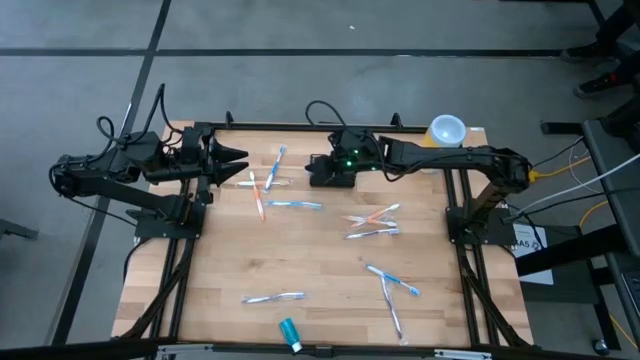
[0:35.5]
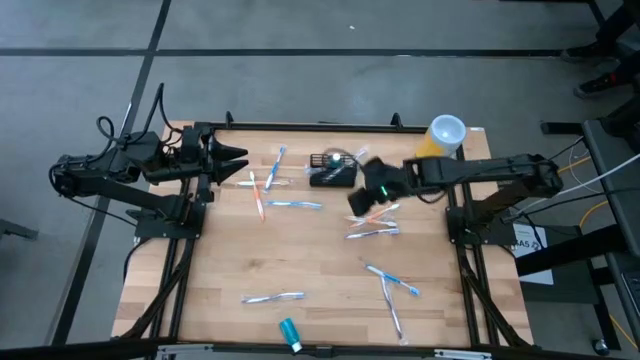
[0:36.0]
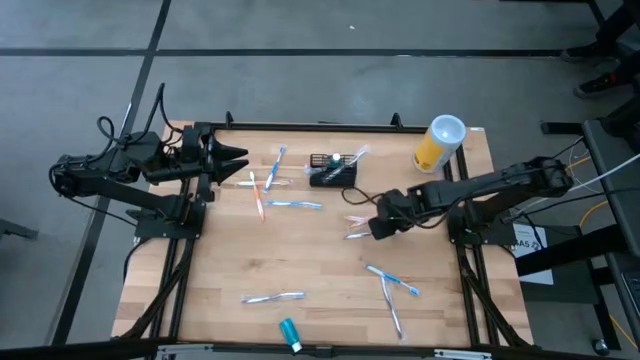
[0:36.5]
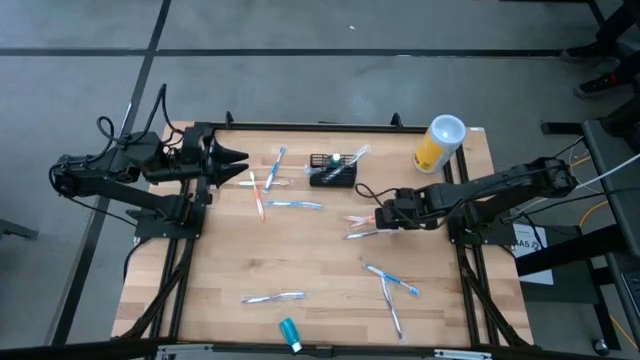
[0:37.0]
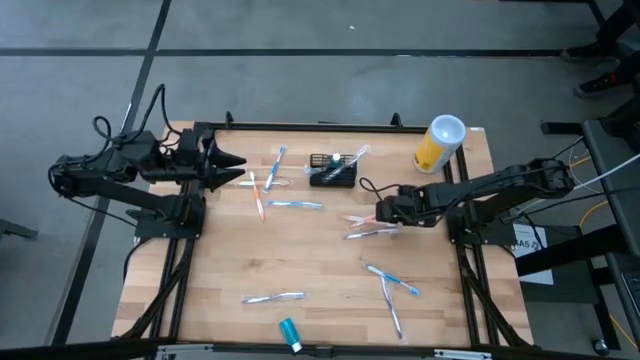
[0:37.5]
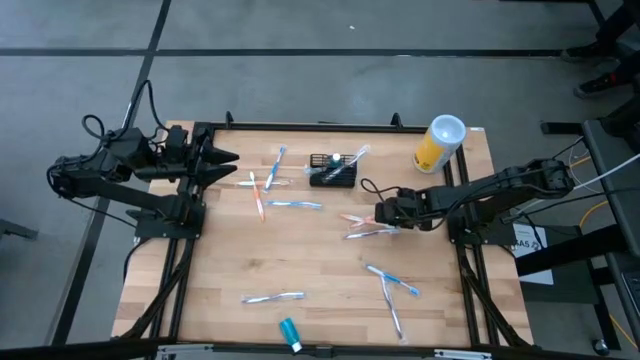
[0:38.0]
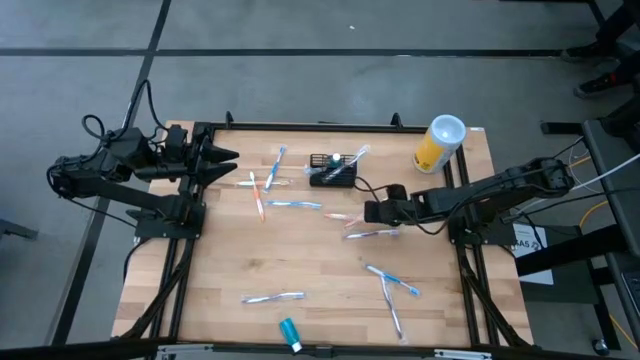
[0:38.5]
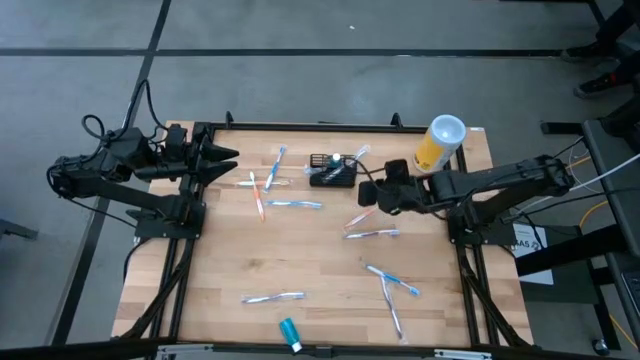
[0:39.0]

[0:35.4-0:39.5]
Task: Pick & Place toothbrushing station
Put the orange toothbrush into the black mesh organizer

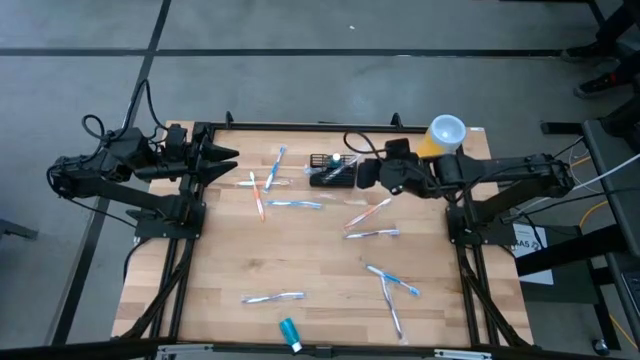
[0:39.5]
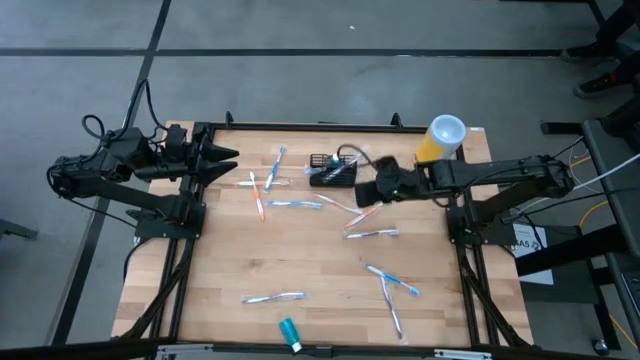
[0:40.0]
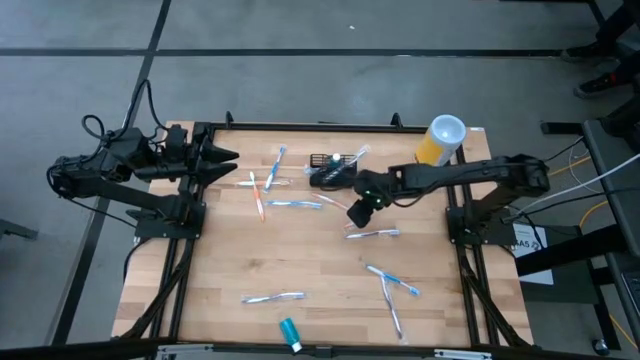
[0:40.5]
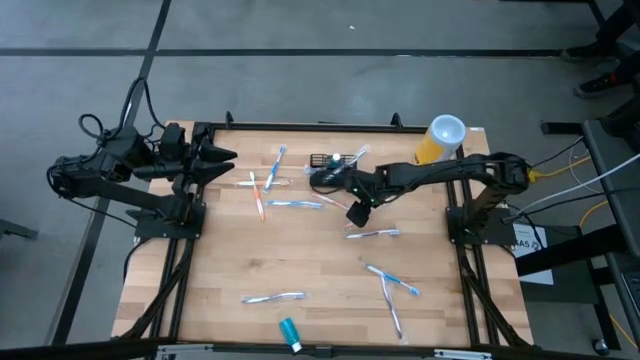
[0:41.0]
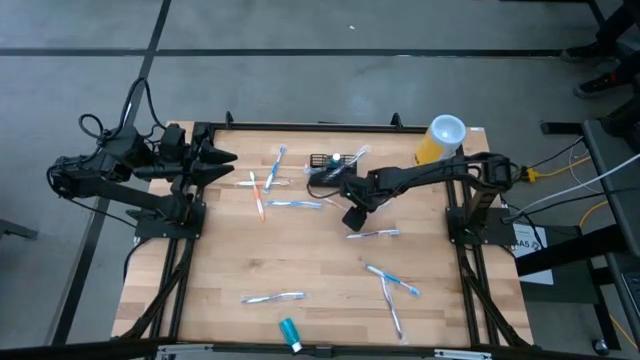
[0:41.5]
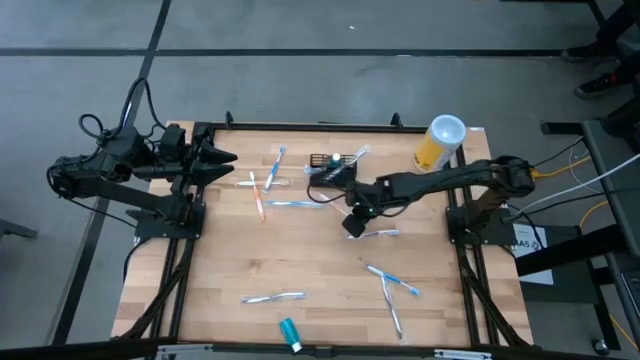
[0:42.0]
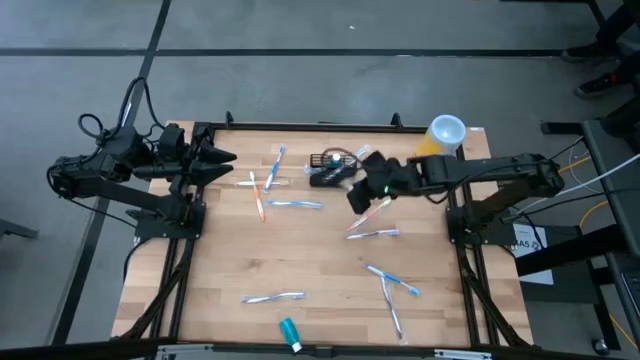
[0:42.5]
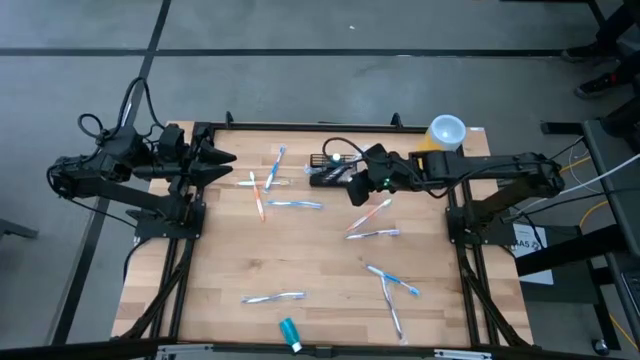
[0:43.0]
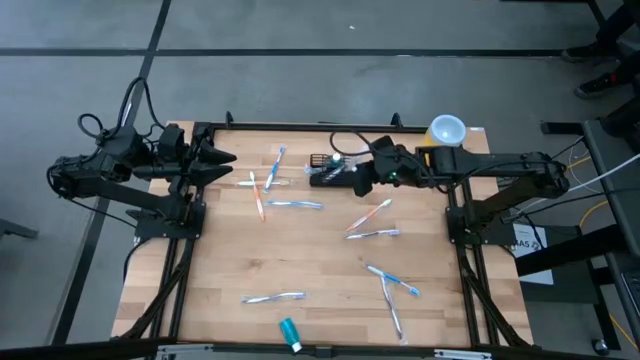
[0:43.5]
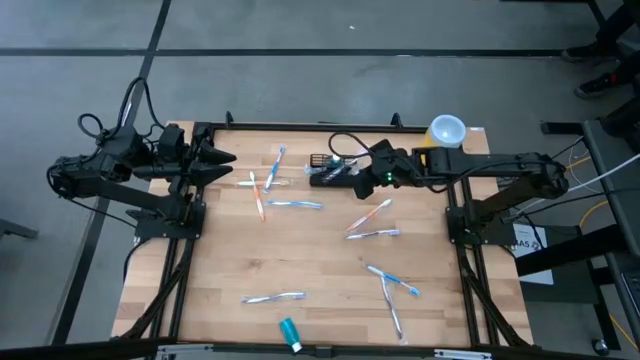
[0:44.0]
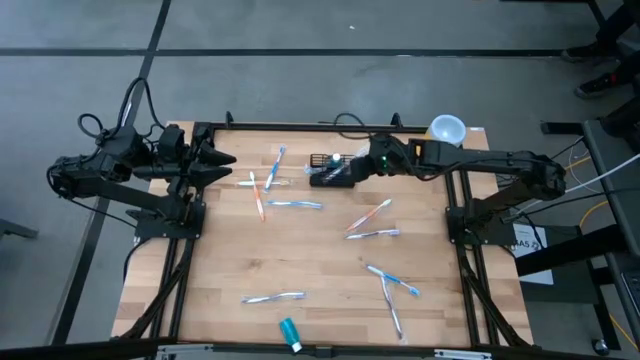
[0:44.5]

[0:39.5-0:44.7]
Put the orange toothbrush into the black mesh organizer

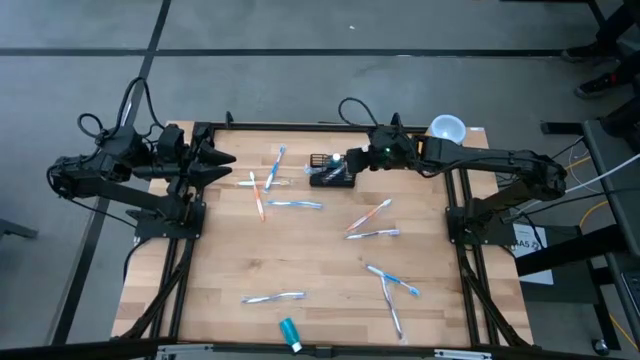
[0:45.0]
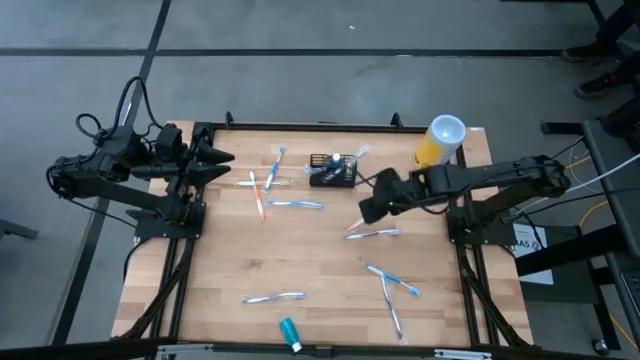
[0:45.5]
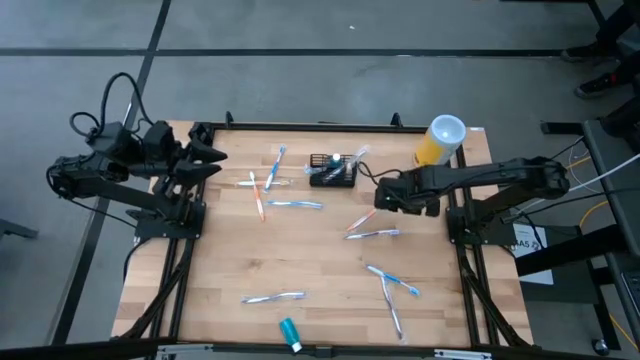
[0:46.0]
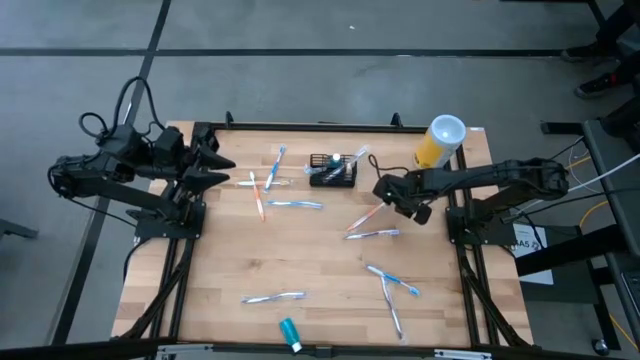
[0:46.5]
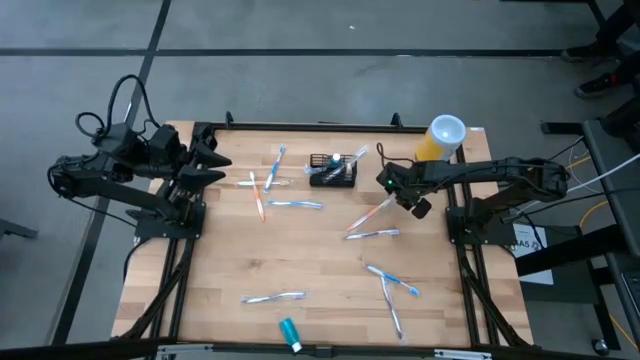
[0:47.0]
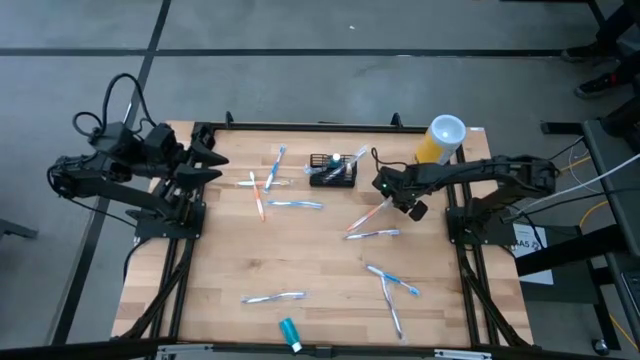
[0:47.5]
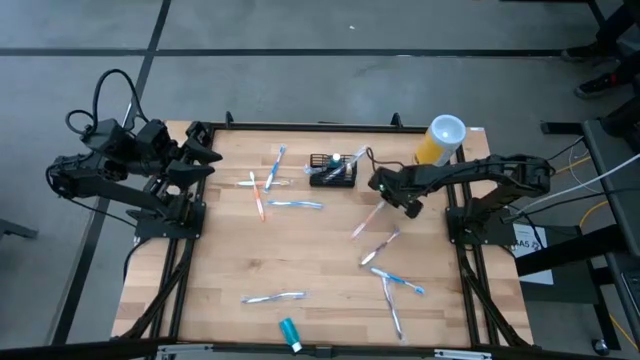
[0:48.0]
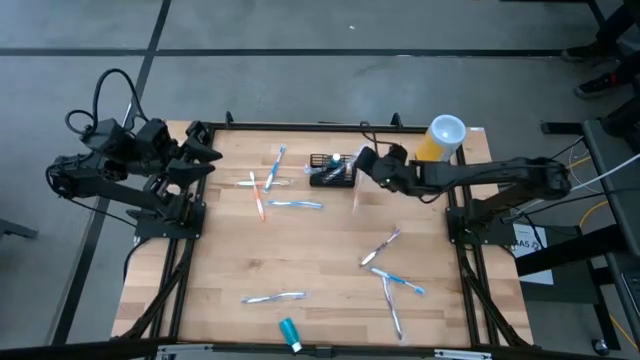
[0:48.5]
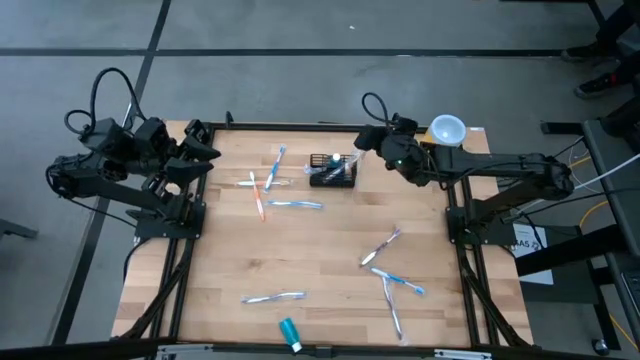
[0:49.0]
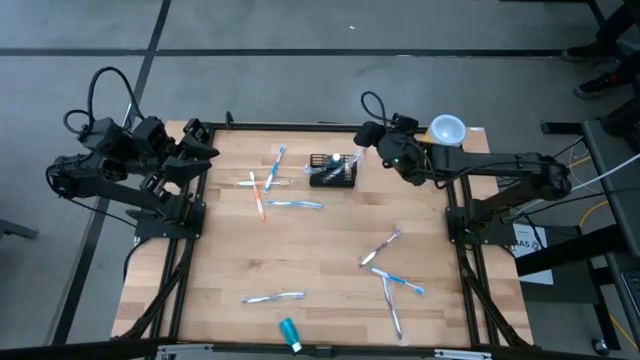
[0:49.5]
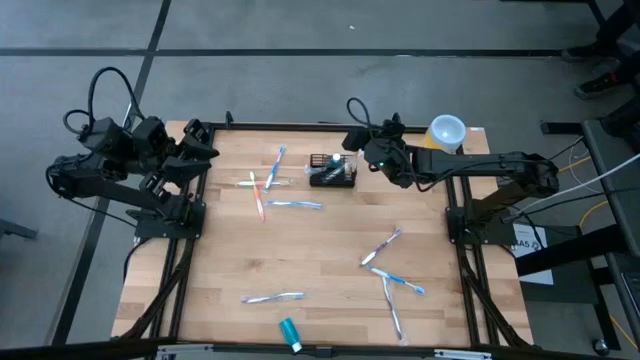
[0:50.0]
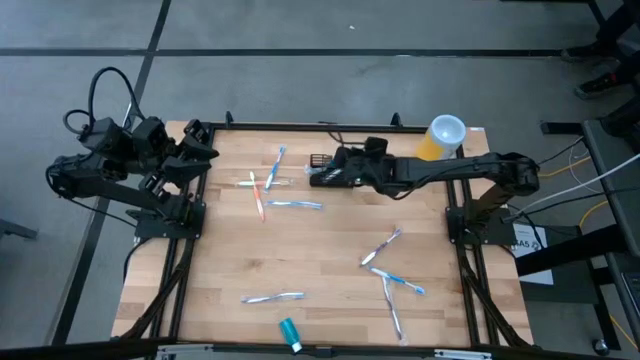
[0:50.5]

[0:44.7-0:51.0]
Put the orange toothbrush into the black mesh organizer

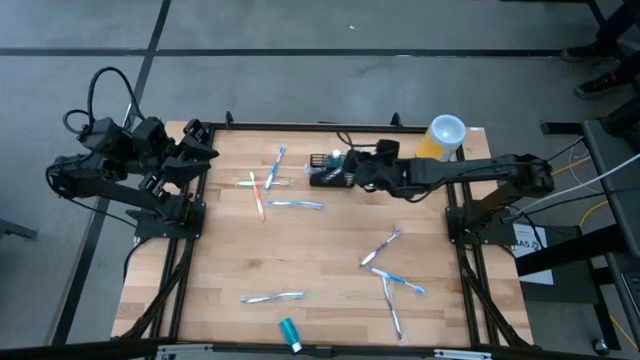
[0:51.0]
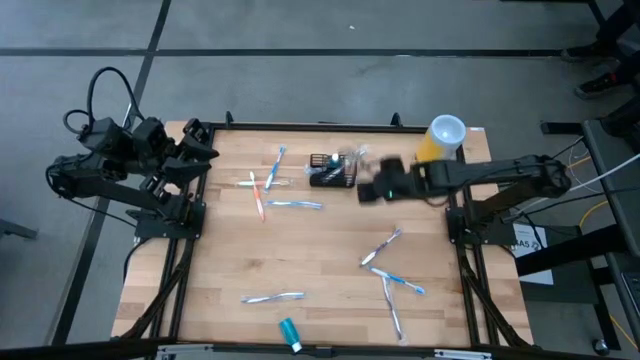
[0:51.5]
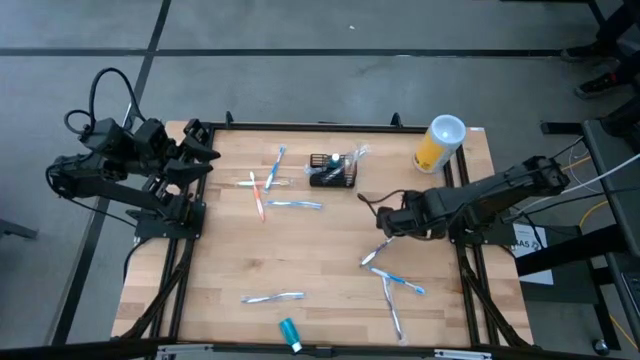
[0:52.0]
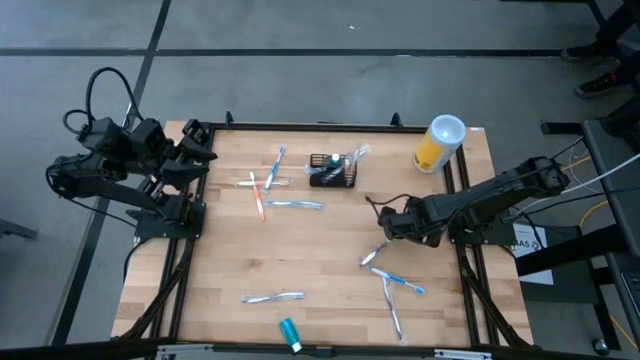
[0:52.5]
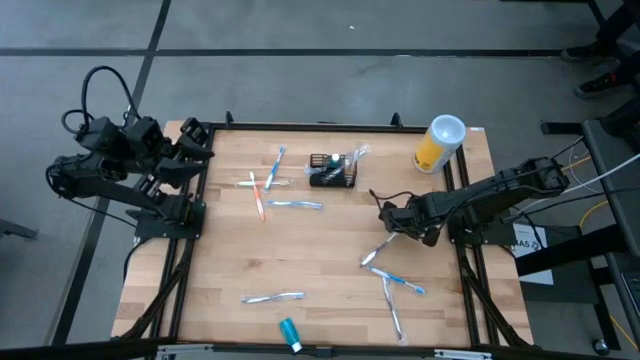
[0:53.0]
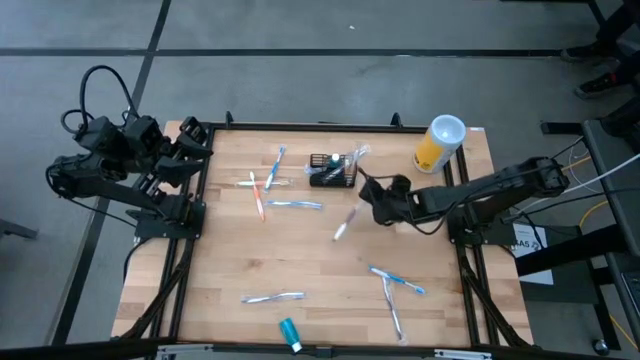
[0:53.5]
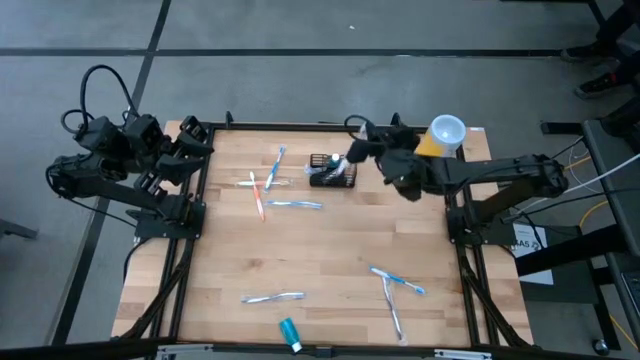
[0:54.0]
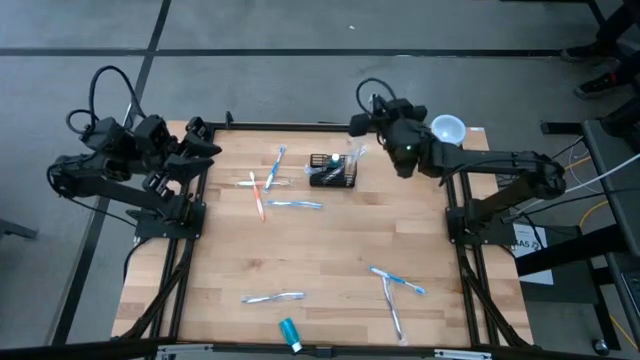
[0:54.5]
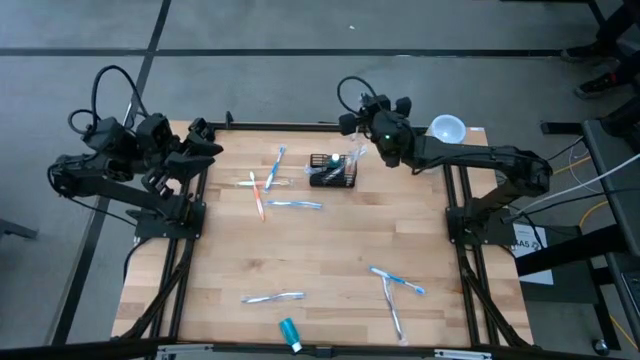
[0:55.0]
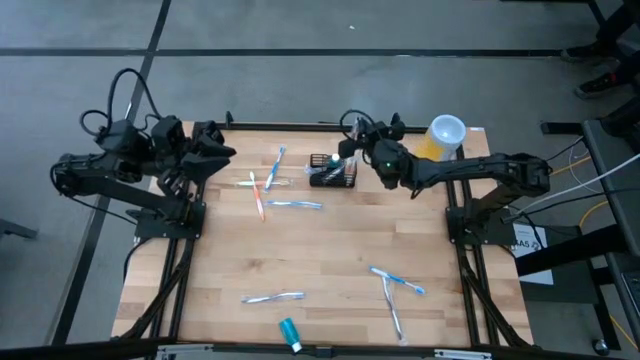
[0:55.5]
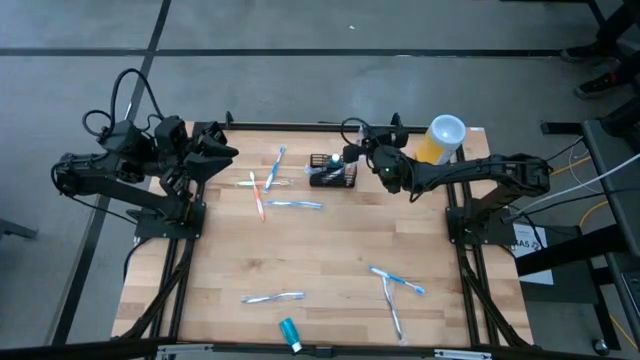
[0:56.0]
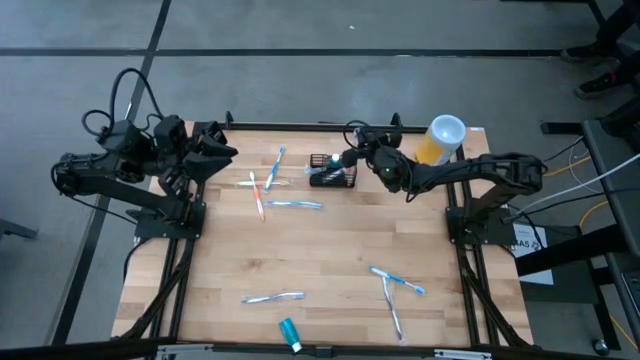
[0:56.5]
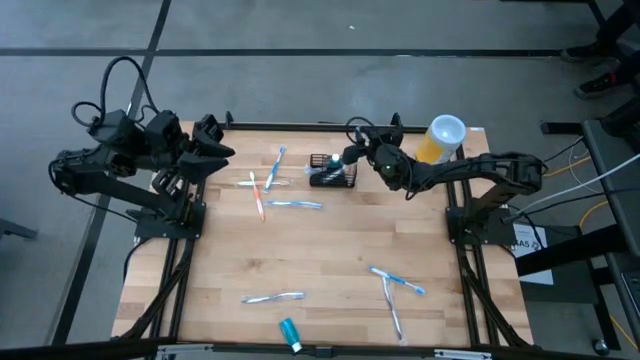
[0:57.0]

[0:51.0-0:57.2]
Put the purple toothbrush into the black mesh organizer
